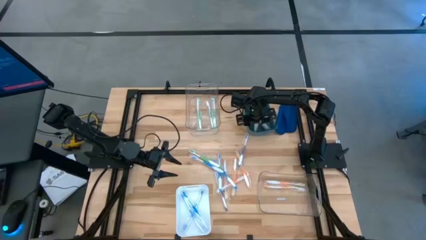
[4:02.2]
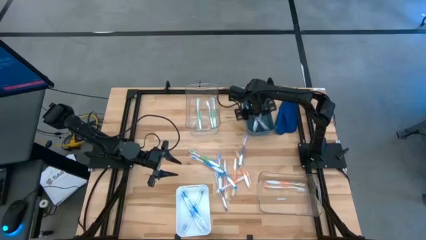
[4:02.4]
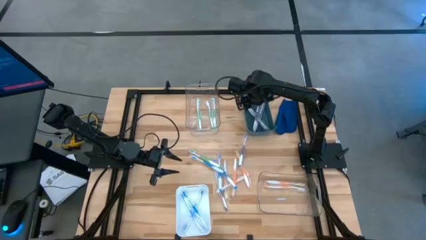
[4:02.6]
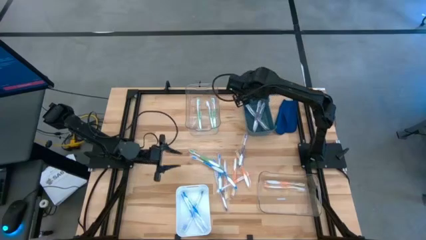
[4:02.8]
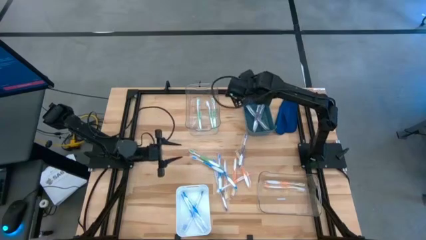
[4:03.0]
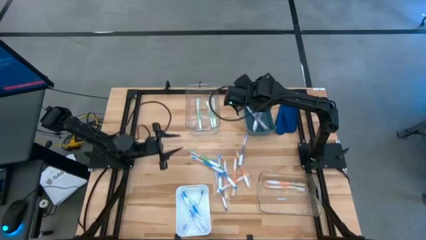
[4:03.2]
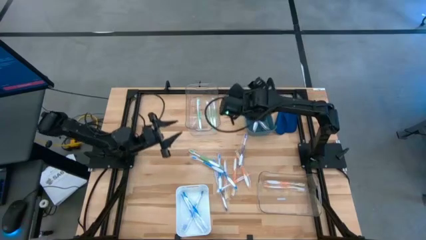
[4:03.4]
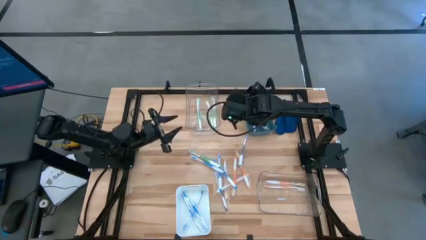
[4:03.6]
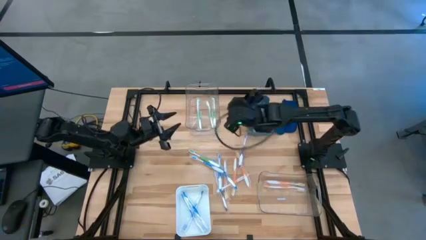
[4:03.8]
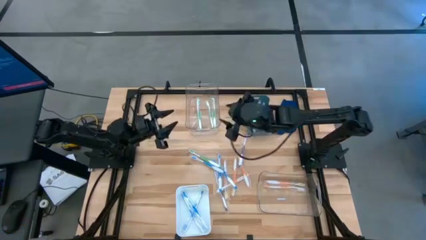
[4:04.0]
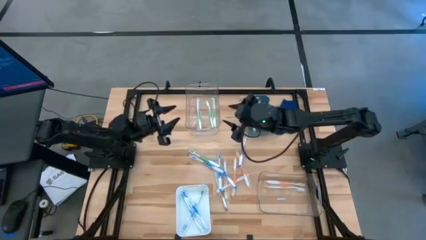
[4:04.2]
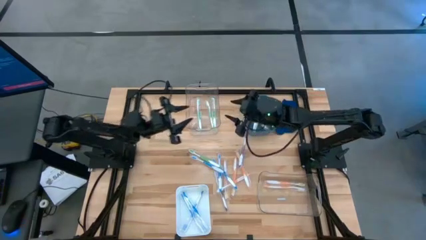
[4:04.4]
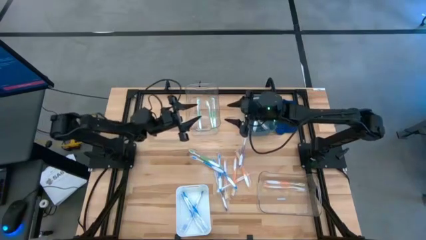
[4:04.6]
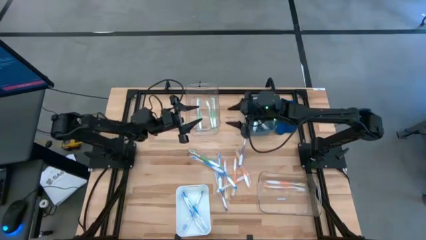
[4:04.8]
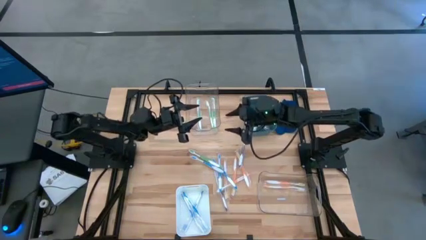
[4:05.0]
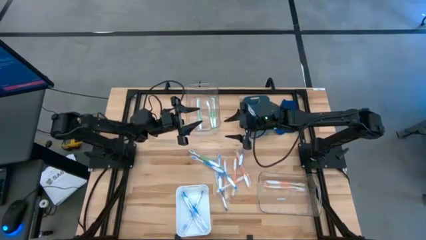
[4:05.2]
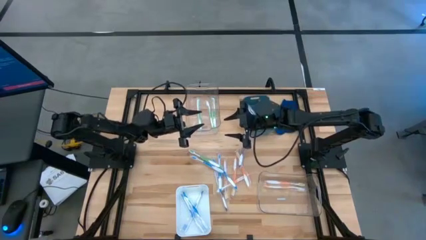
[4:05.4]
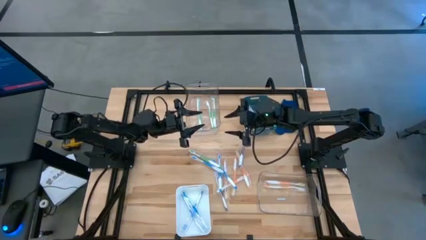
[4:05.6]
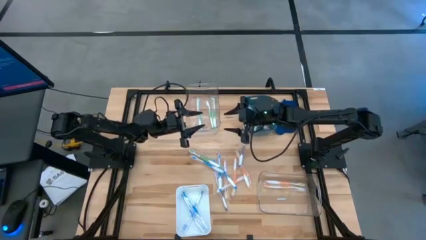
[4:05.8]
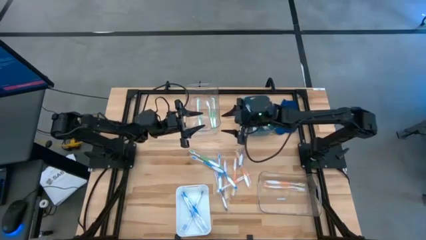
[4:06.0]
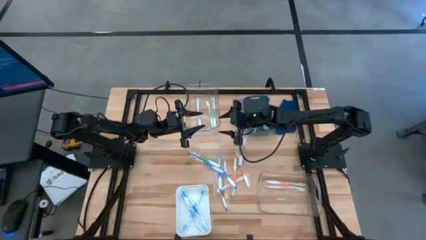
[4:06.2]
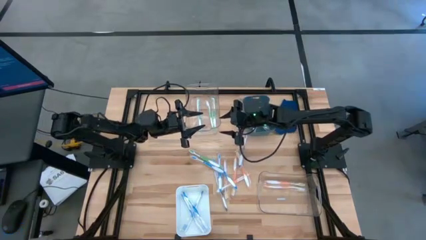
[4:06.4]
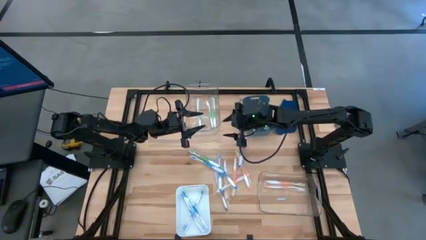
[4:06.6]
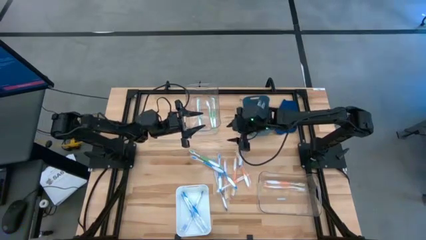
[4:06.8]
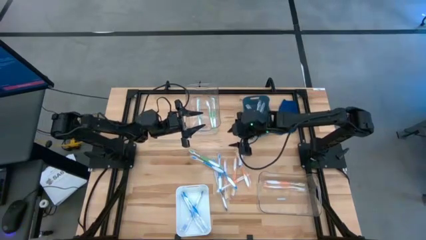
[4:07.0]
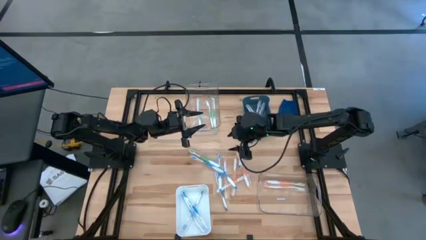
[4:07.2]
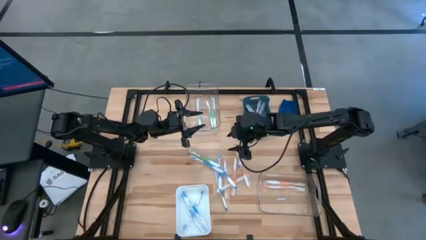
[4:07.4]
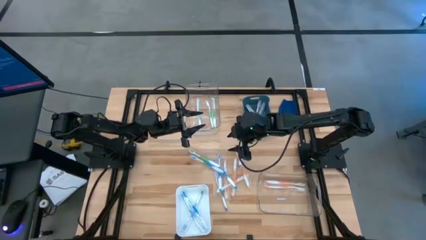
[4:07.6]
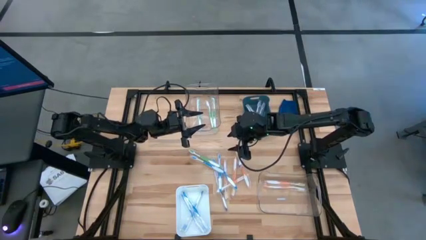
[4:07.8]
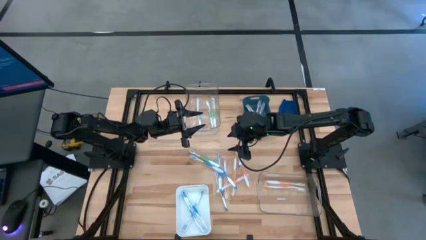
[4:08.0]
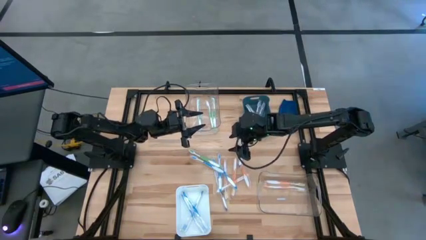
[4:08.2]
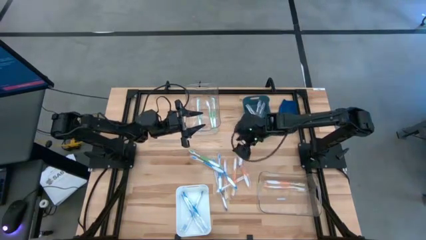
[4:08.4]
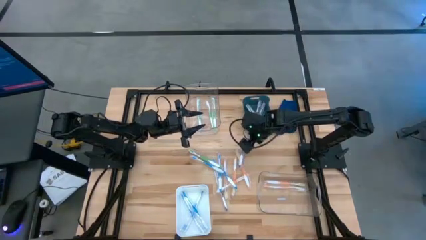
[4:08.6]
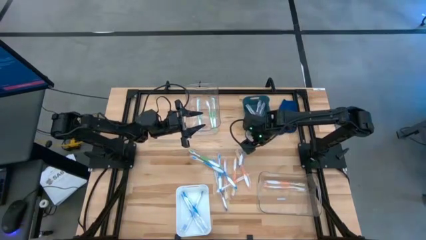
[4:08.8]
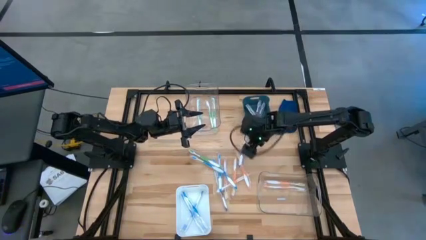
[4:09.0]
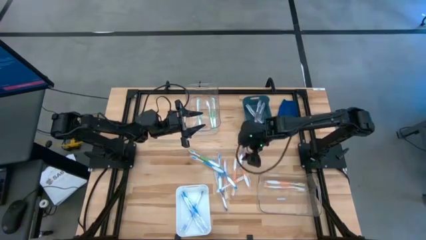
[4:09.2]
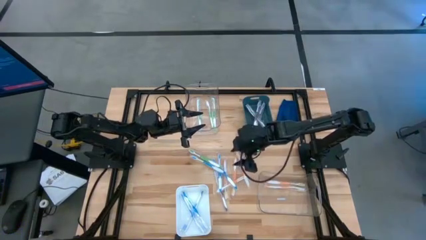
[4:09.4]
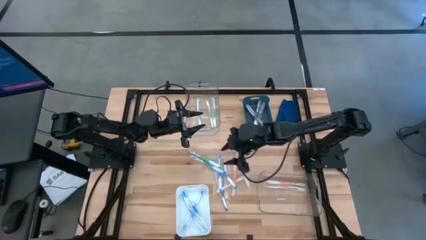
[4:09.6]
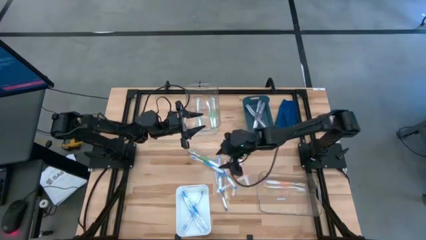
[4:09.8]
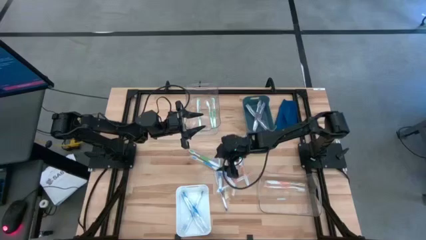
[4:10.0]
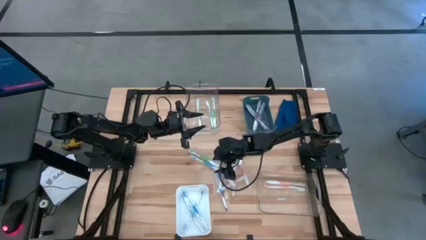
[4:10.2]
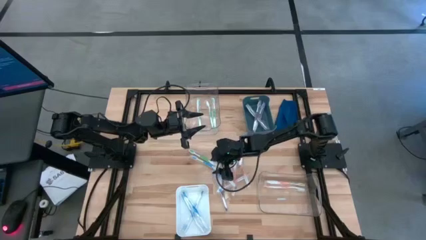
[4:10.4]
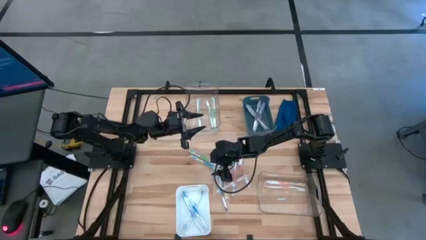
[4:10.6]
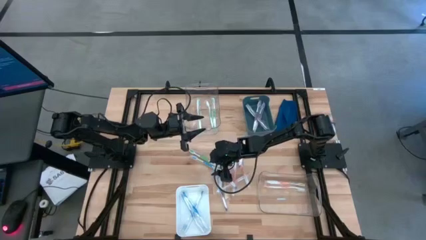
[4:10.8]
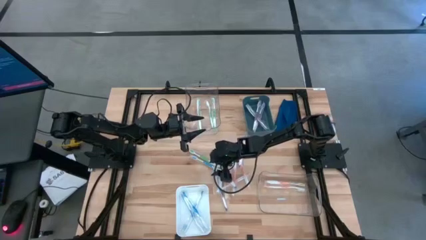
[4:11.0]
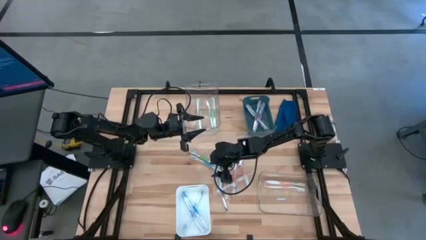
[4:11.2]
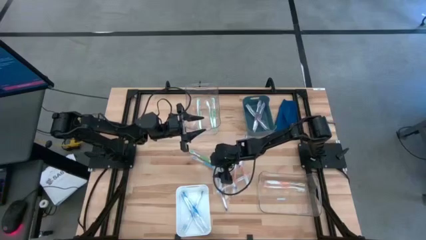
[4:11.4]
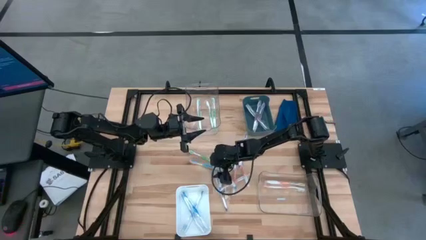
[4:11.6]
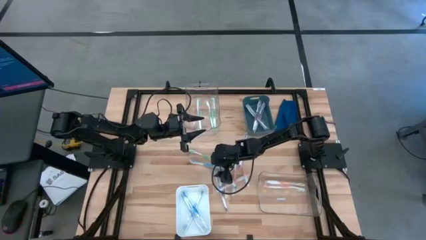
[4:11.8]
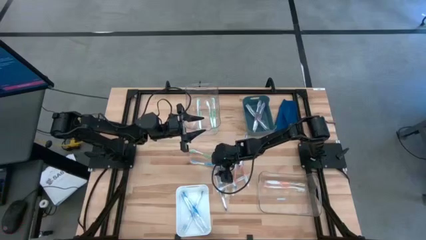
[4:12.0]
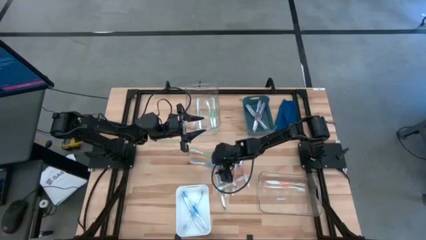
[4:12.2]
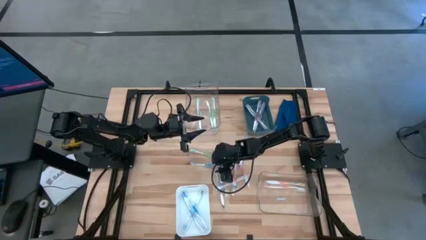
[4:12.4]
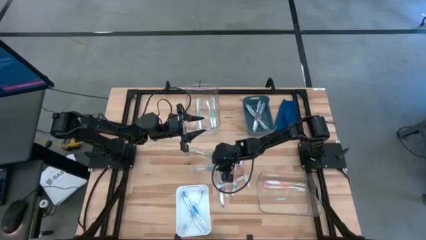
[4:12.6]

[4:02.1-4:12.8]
Task: Pick & Place Toothbrushes
Put the blue toothbrush into the white bin

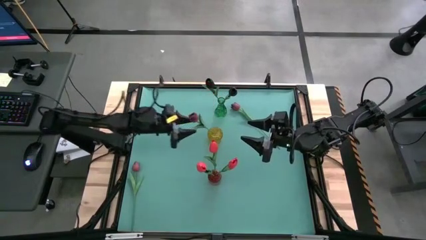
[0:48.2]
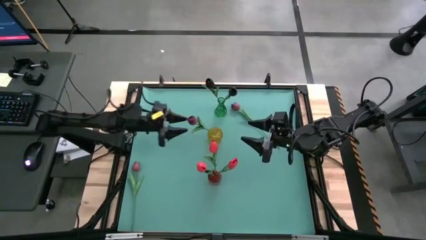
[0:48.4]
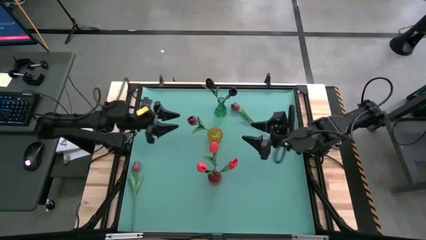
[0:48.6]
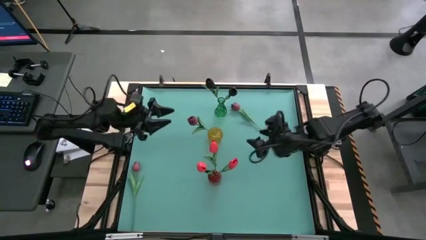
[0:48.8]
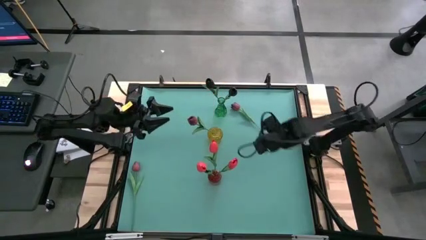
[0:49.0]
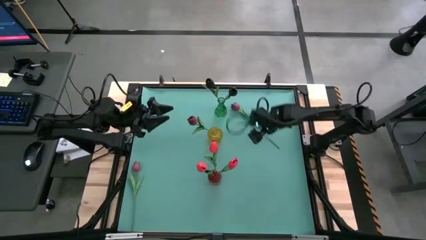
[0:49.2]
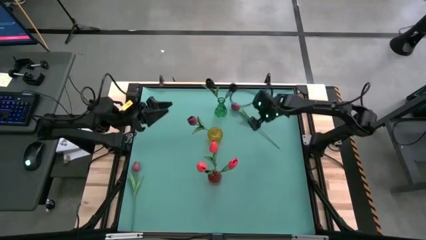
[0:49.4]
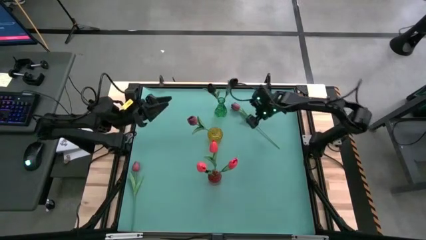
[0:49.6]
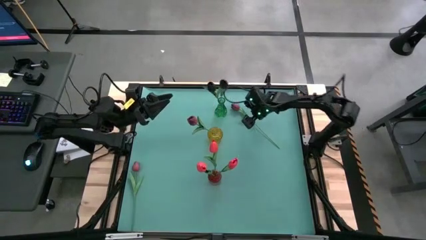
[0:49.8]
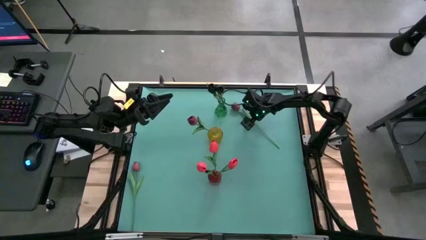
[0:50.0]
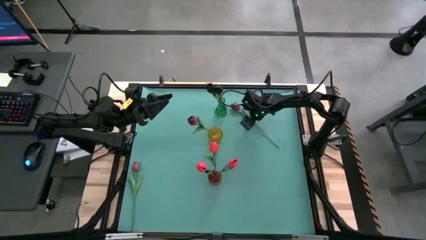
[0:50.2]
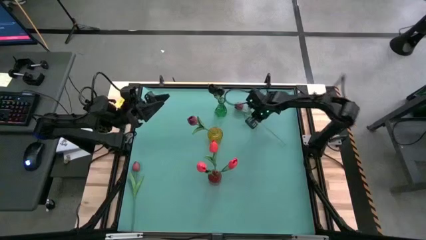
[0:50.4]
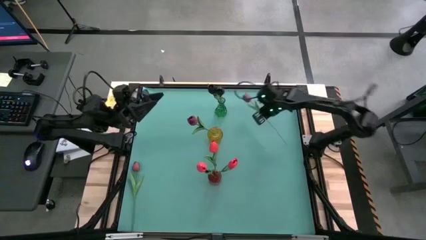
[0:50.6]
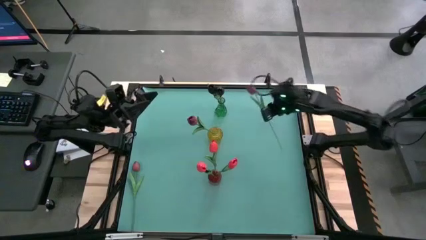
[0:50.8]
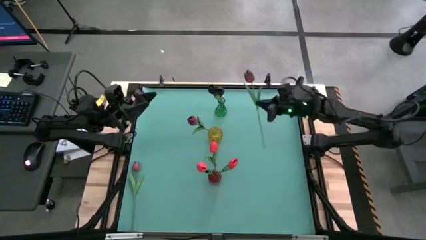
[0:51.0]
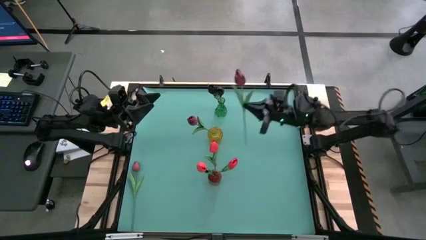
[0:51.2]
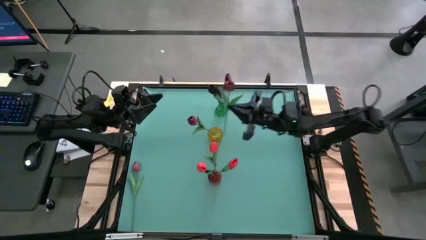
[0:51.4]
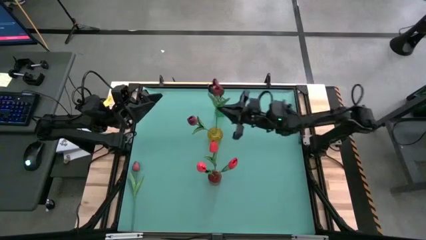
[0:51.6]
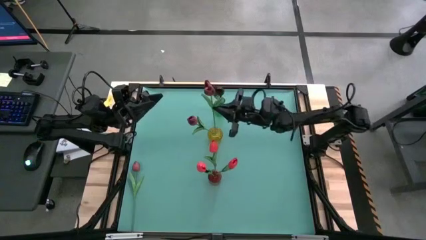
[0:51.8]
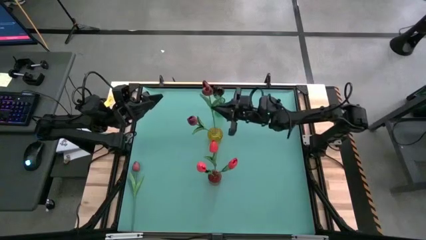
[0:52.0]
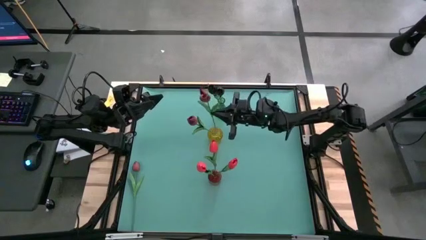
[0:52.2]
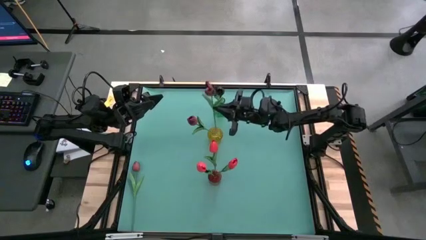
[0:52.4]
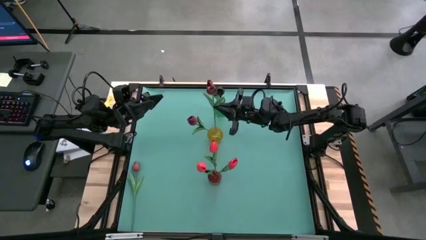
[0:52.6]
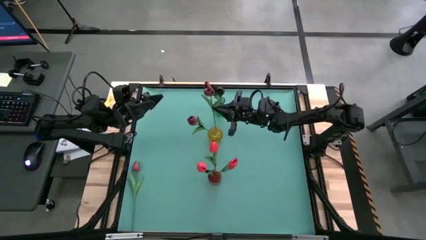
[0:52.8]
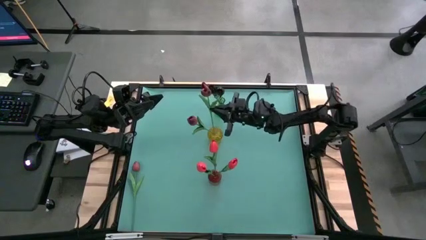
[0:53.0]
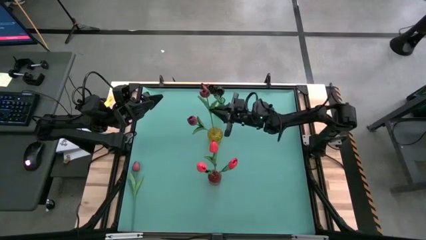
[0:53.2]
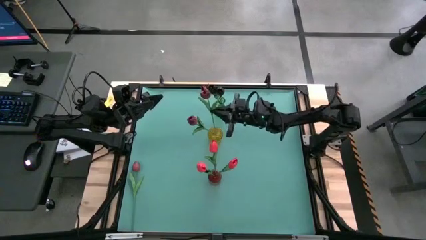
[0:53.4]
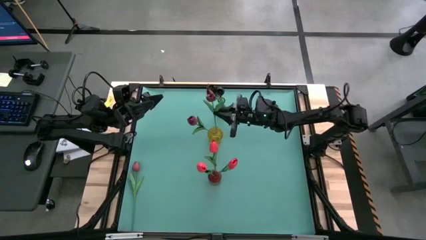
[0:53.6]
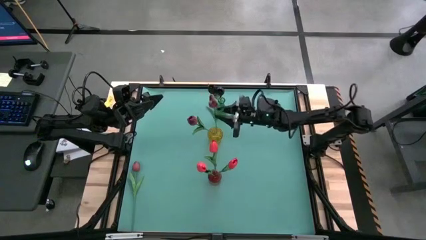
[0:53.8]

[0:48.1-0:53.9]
Task: Sort flowers into vase by color
Put the top red flower into the yellow flower vase
